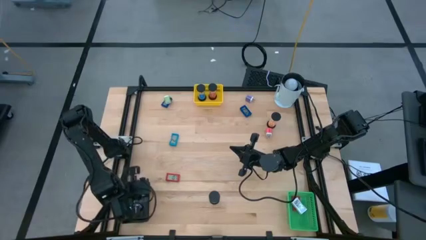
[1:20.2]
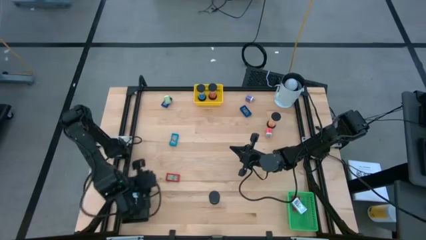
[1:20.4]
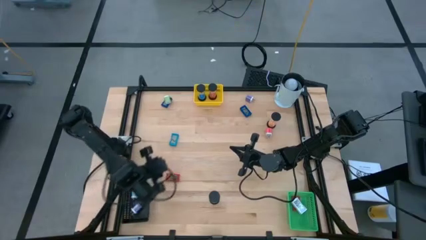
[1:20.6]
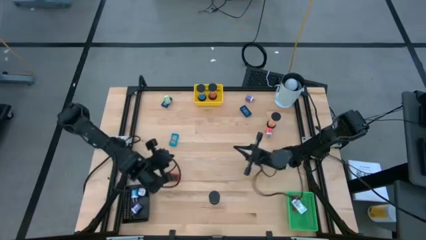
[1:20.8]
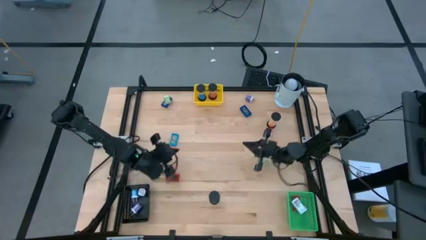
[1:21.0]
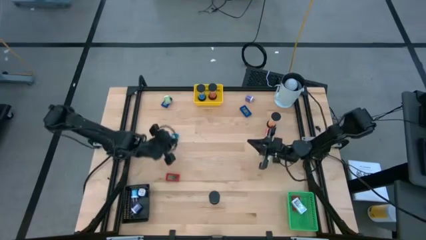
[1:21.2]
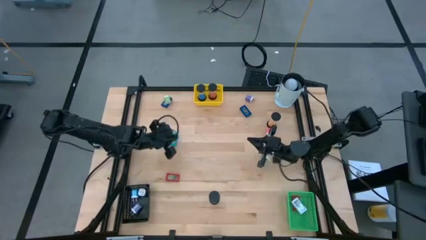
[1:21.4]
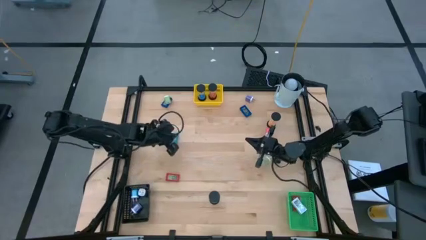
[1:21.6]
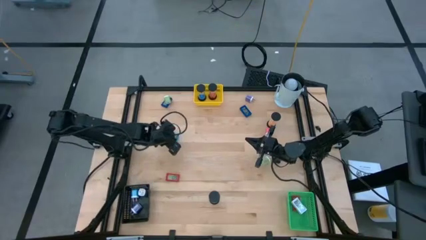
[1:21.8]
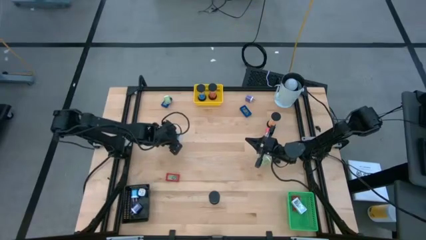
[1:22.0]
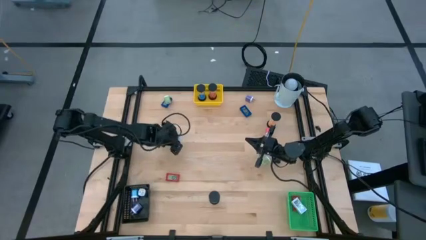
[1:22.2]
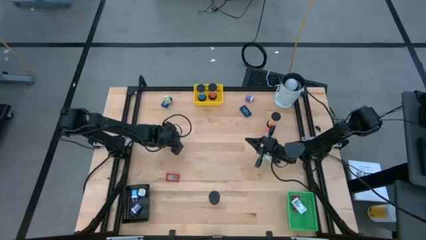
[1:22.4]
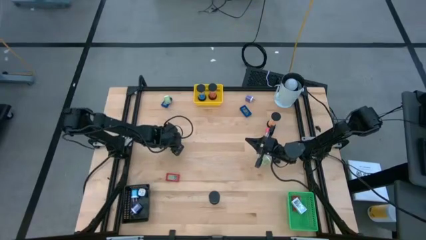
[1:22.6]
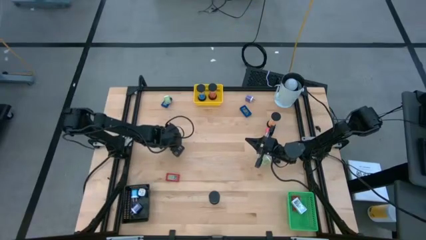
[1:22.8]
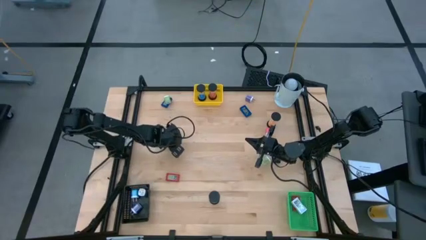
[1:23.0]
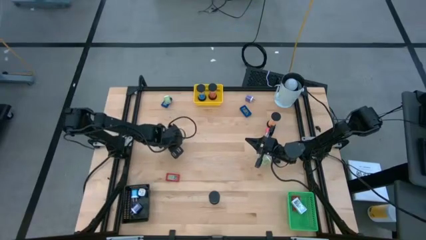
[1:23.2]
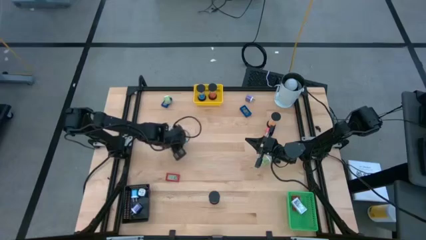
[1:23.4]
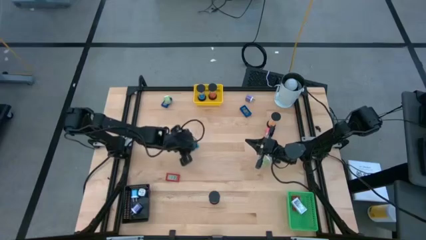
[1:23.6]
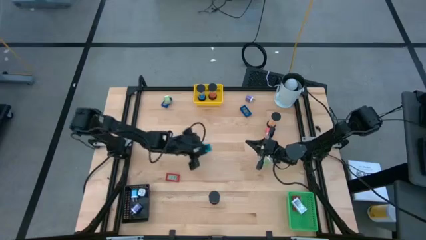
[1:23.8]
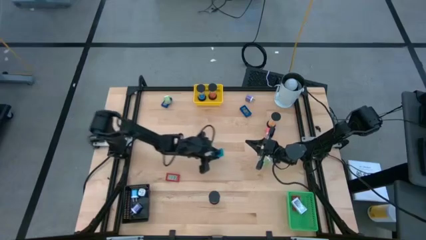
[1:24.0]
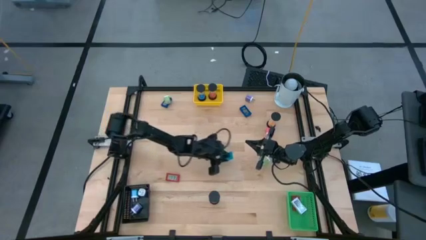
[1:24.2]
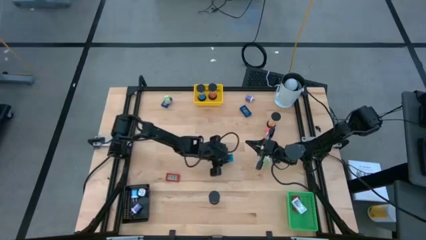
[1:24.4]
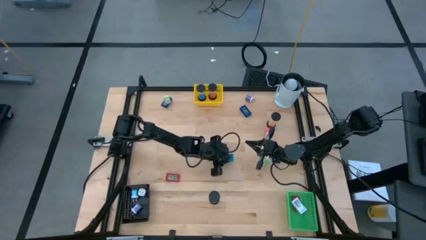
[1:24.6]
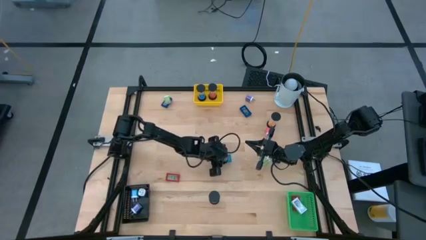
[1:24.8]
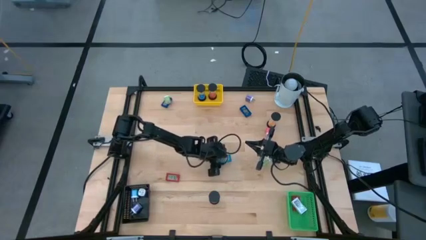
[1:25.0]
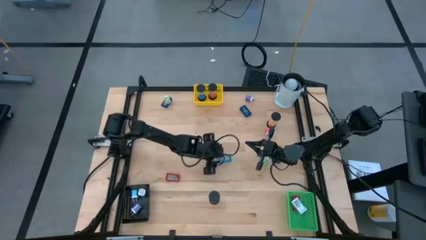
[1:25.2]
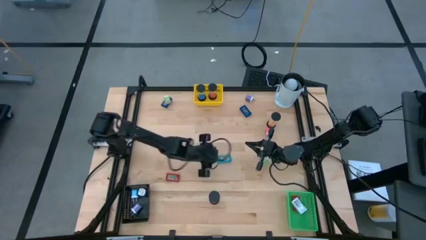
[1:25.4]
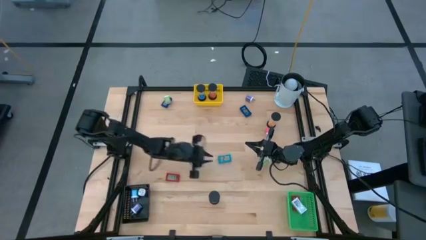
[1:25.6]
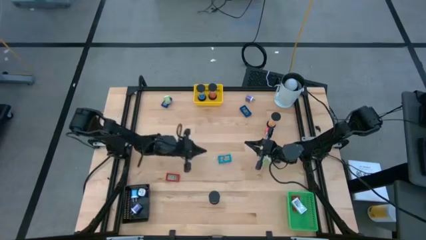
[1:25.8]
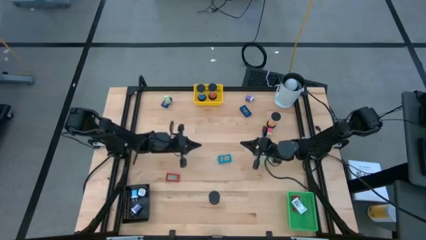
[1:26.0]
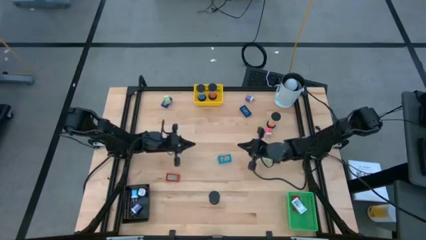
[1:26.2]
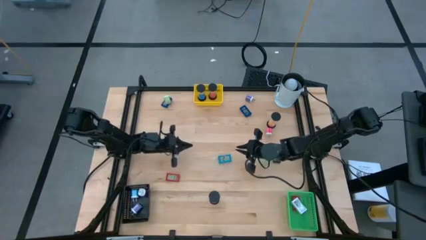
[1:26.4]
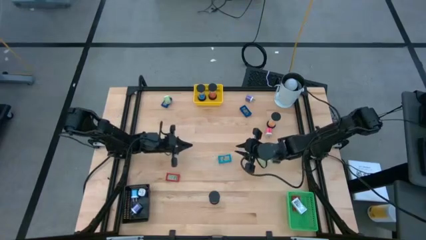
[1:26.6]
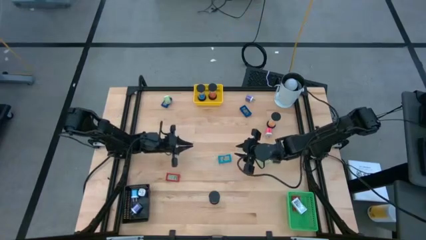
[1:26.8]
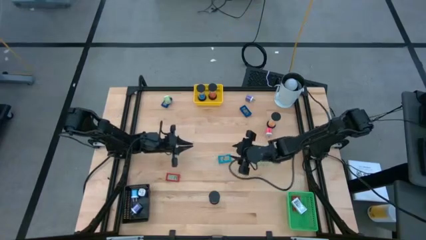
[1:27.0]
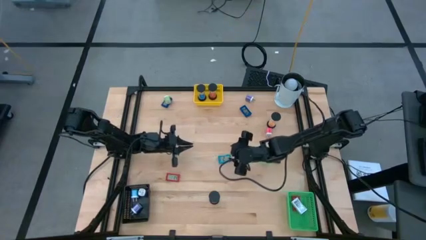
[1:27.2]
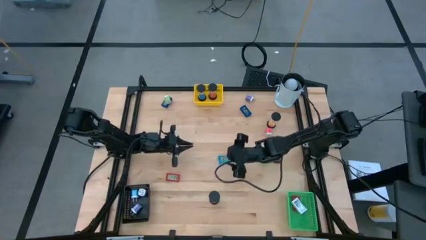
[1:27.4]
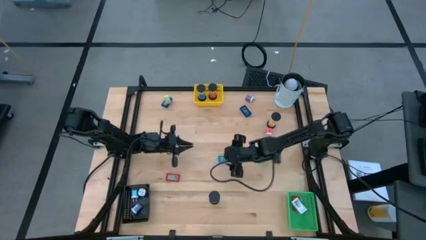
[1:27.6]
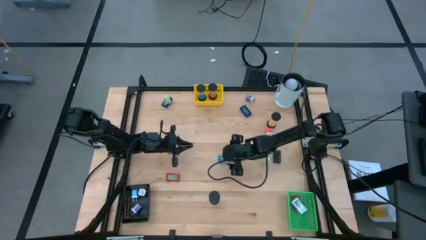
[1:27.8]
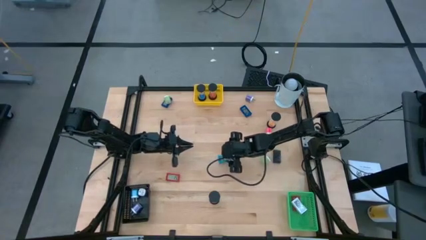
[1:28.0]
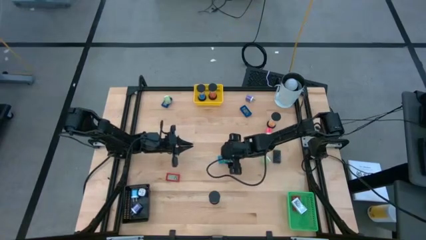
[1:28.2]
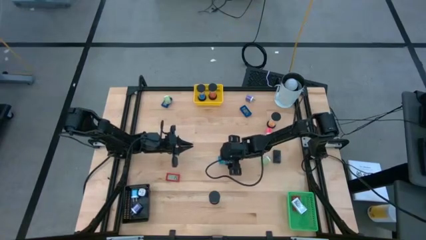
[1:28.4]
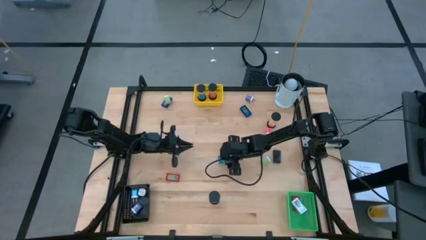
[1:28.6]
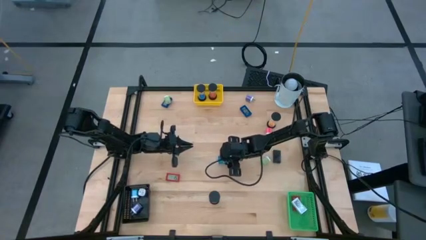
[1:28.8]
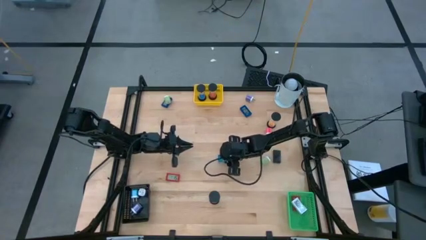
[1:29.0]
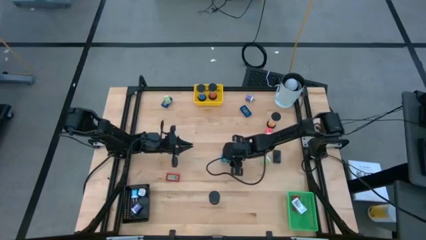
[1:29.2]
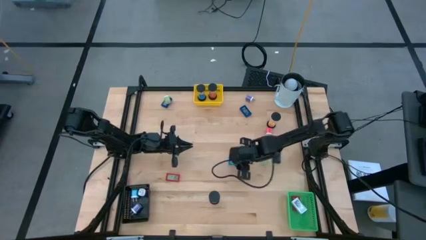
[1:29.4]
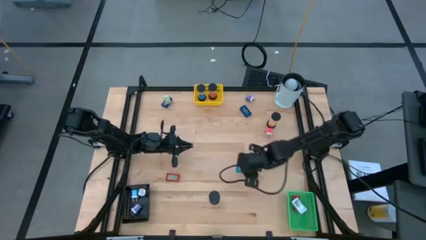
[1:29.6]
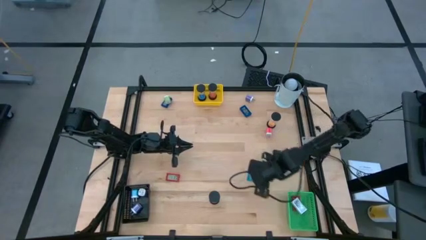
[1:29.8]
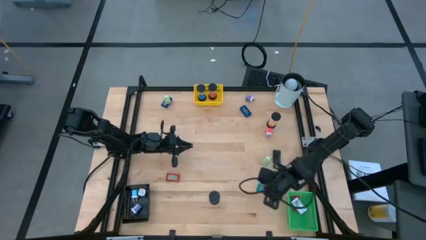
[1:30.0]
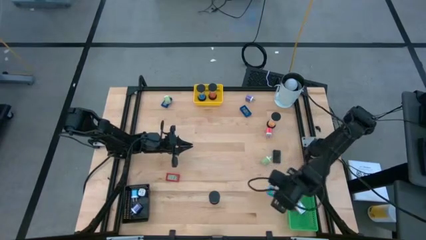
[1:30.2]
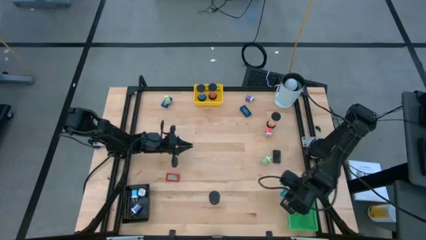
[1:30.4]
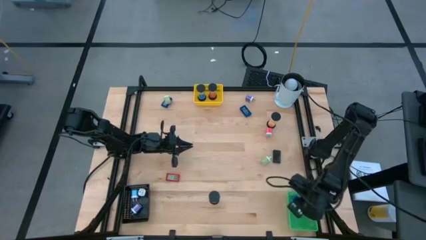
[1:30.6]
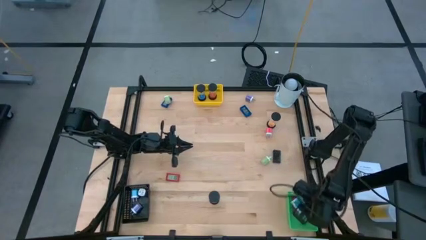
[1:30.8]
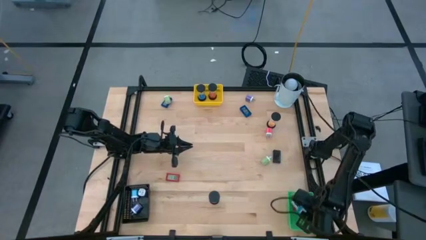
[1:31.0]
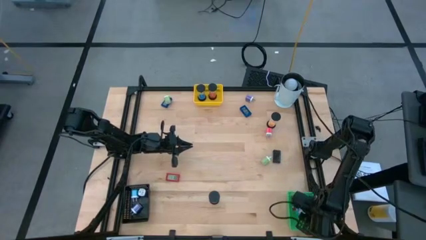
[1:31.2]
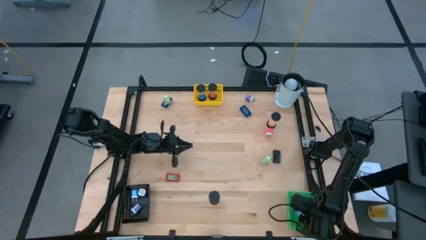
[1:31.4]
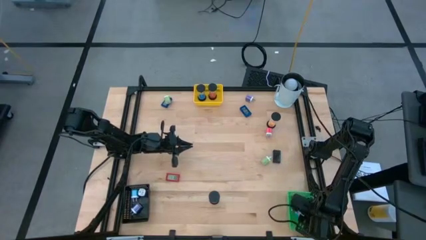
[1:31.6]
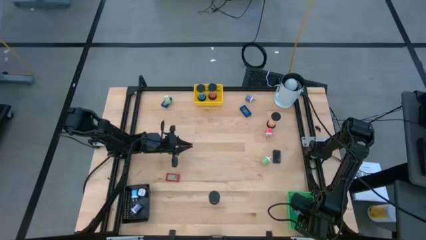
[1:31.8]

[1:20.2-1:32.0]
Task: Pick & Place Office items
Put the light blue digital timer into the green bin

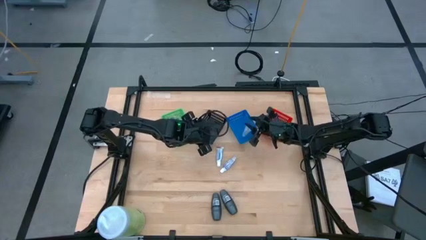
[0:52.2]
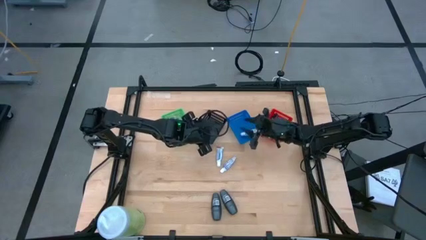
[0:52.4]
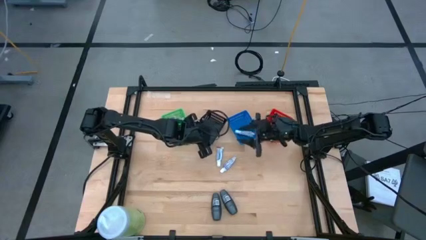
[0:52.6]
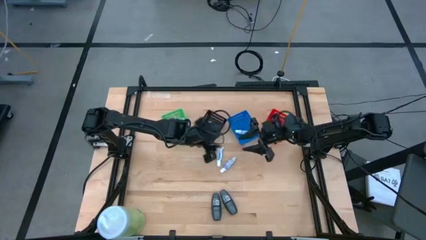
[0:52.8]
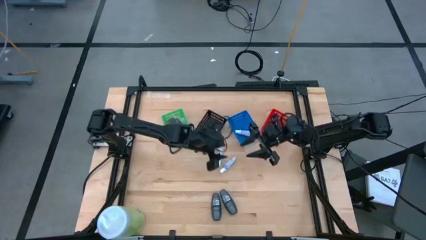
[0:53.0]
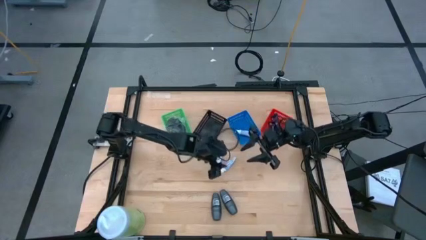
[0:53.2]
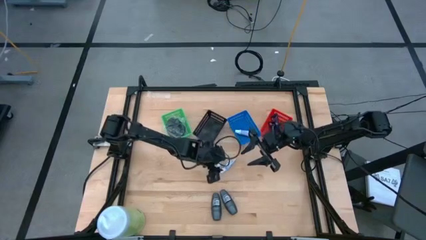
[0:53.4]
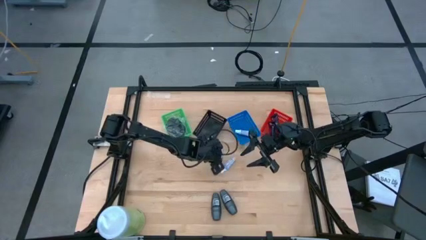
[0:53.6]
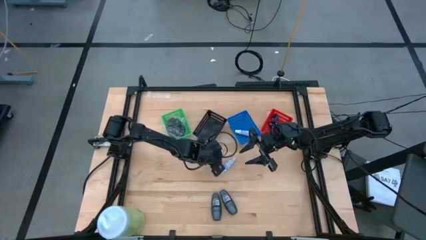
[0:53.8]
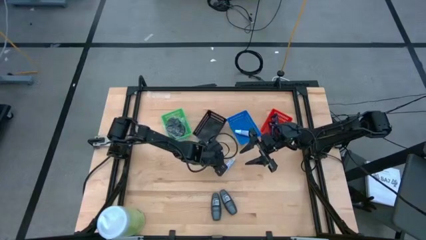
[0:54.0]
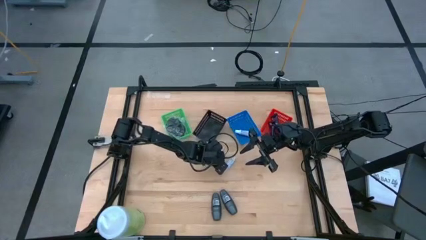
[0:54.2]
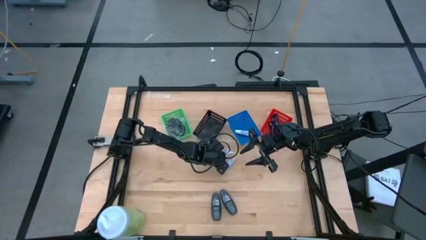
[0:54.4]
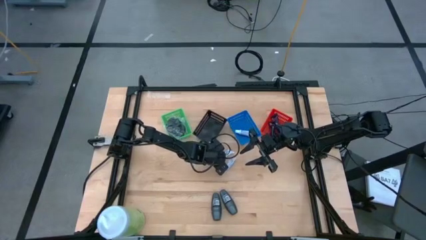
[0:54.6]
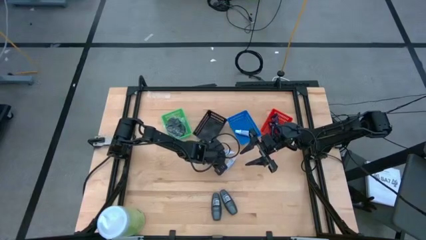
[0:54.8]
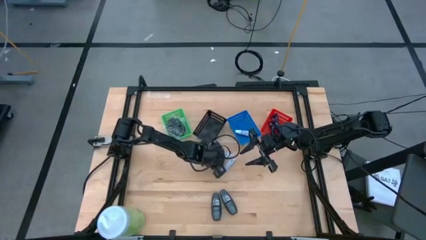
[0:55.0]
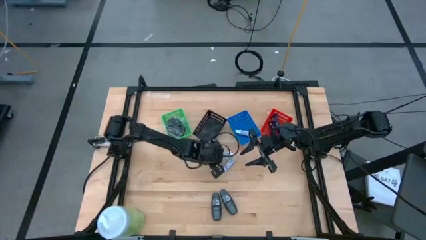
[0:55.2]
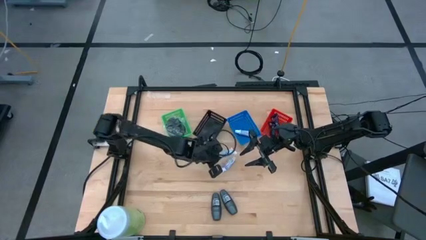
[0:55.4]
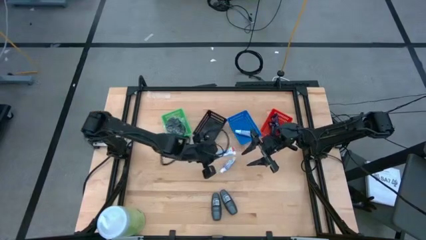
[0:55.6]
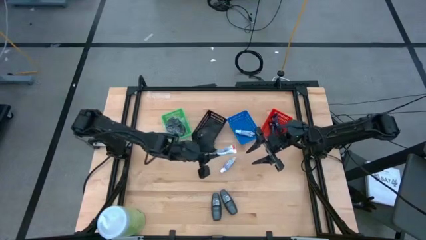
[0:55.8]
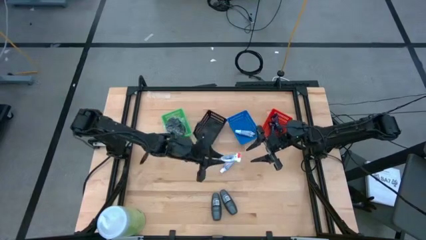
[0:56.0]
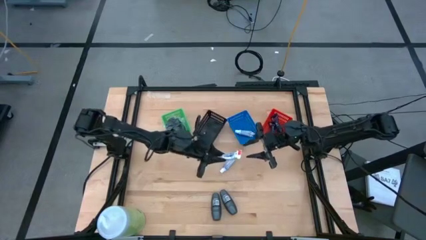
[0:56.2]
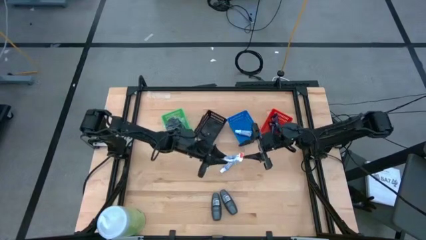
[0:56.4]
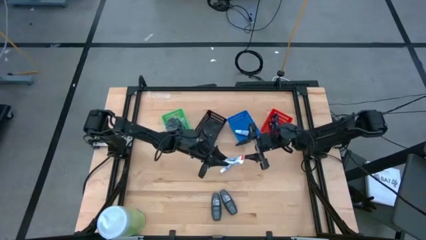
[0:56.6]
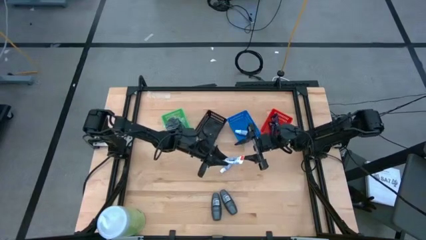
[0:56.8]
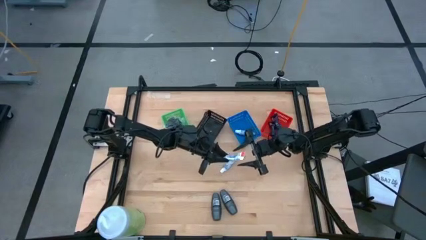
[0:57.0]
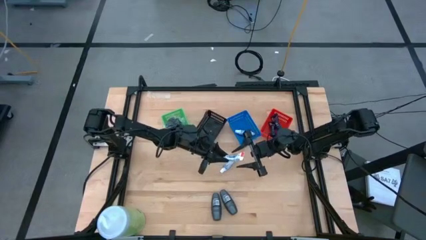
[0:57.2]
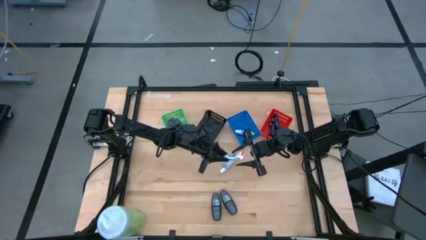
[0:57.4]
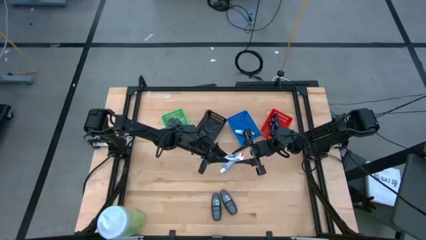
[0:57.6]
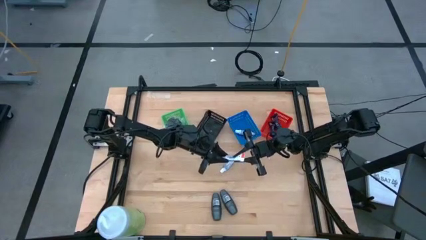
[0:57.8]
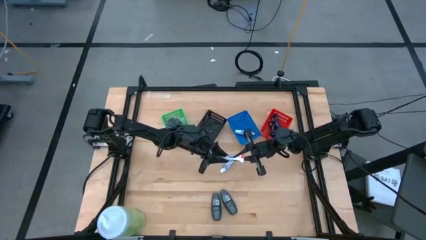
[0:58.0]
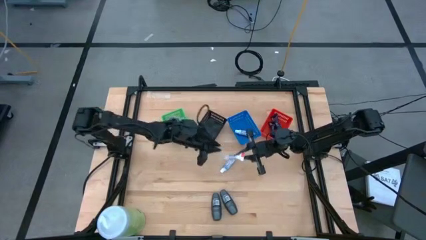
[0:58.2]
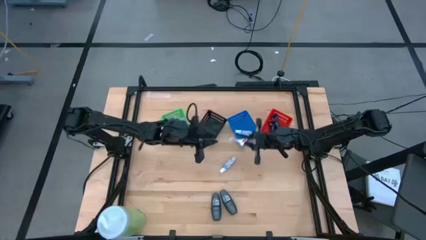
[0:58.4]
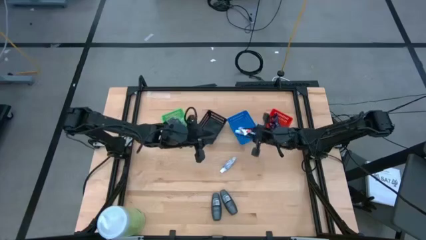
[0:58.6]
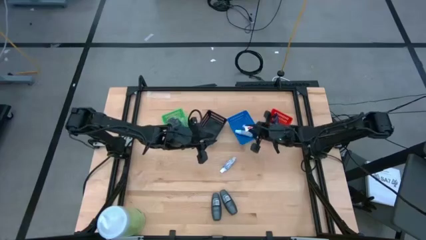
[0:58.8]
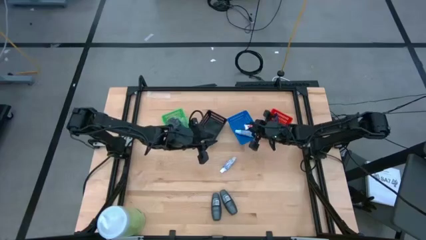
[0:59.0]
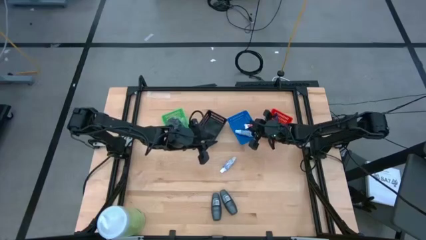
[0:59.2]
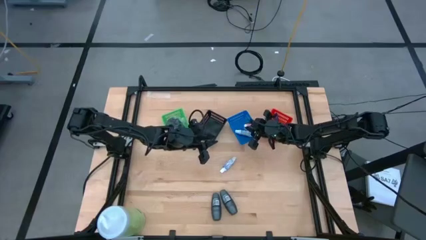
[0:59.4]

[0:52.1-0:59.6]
Task: Pick & Place Travel size toiletries
Put the left white toothpaste into the blue bin
